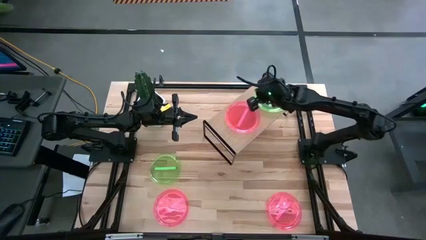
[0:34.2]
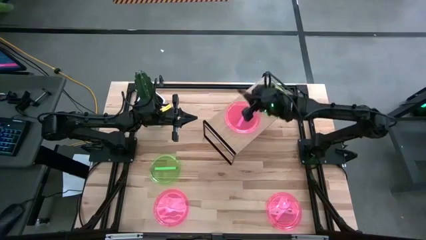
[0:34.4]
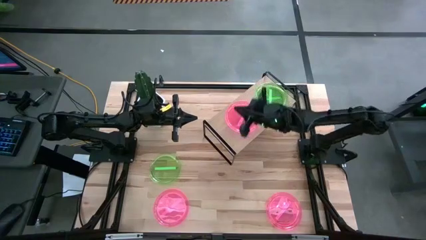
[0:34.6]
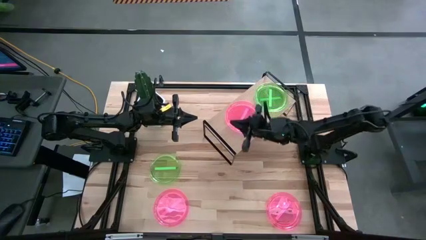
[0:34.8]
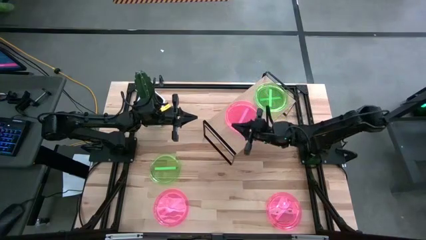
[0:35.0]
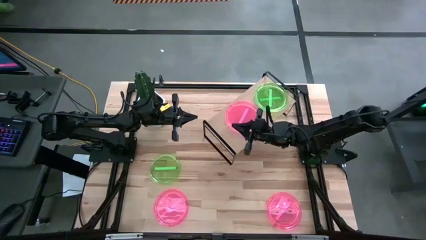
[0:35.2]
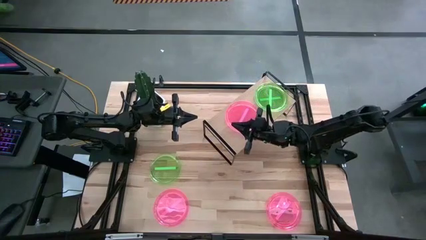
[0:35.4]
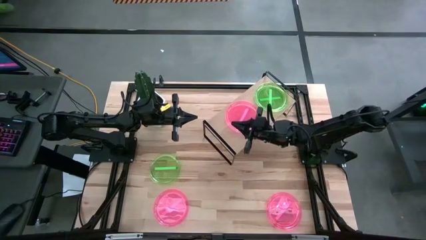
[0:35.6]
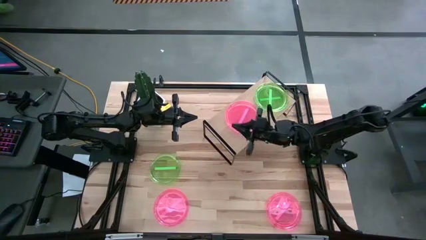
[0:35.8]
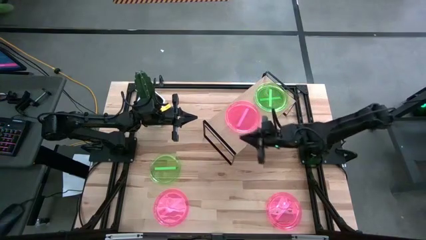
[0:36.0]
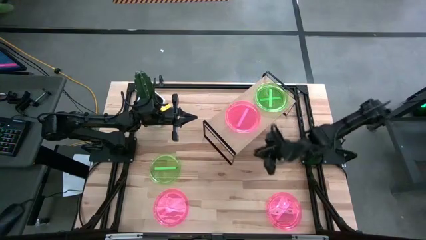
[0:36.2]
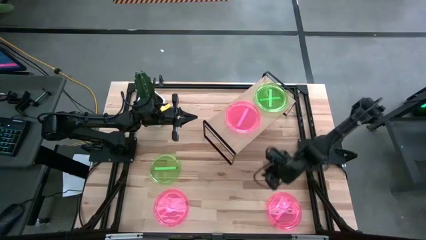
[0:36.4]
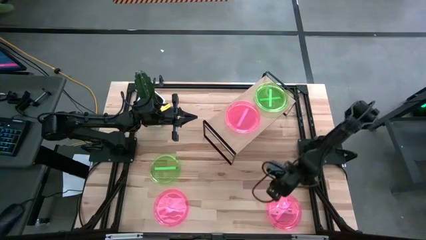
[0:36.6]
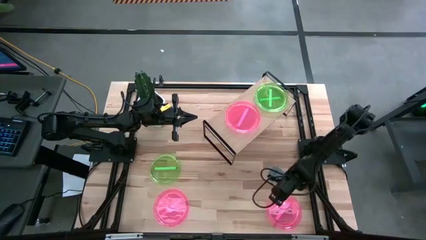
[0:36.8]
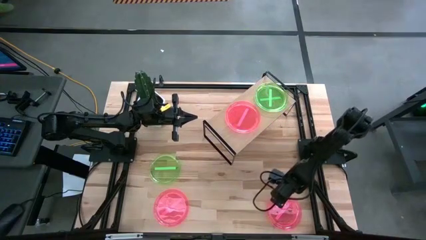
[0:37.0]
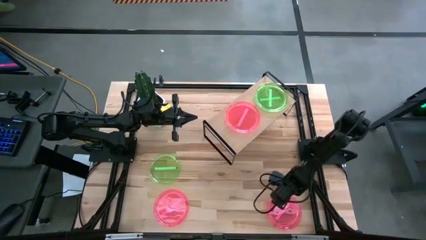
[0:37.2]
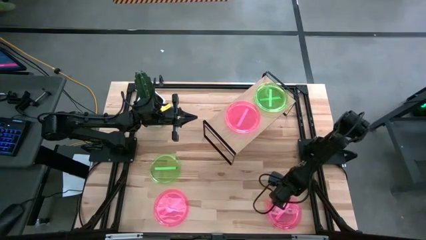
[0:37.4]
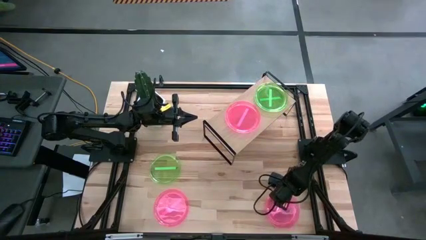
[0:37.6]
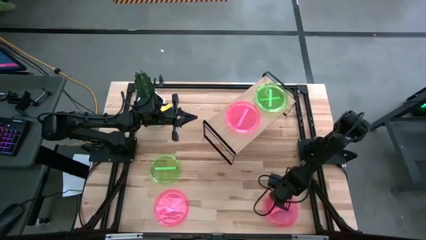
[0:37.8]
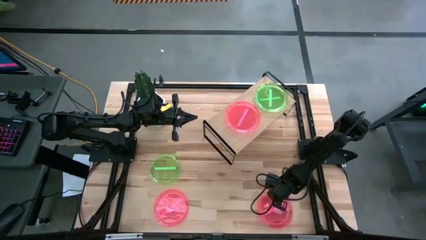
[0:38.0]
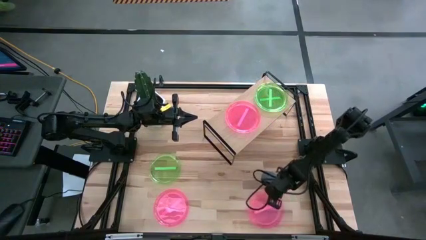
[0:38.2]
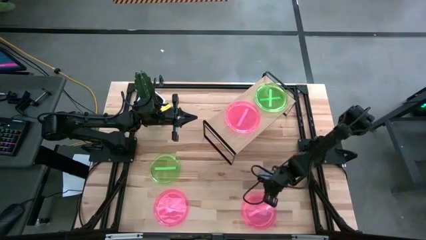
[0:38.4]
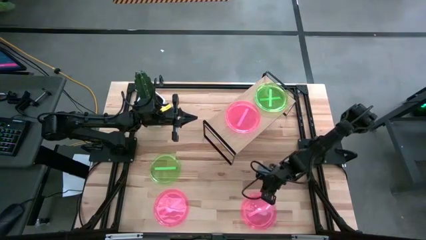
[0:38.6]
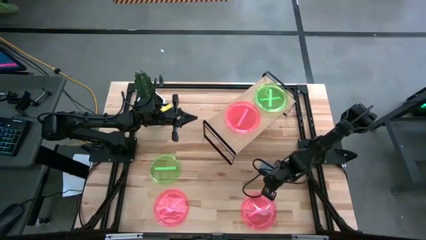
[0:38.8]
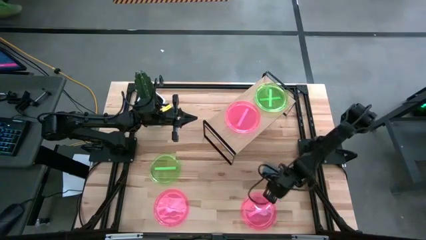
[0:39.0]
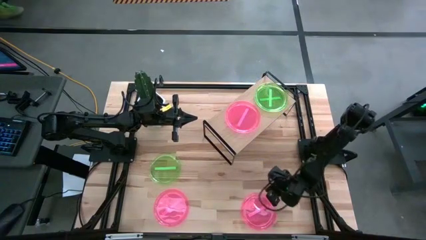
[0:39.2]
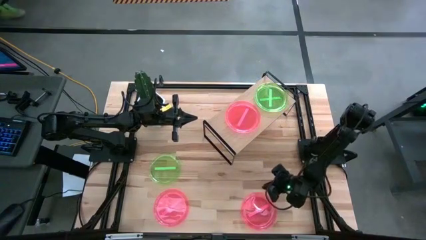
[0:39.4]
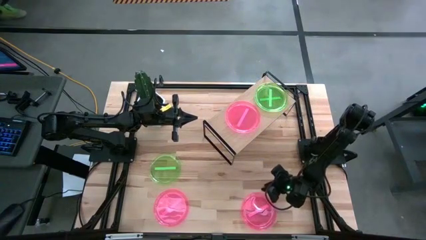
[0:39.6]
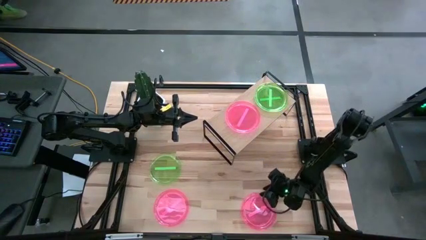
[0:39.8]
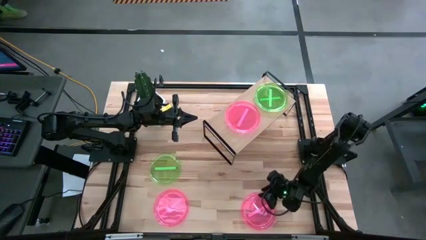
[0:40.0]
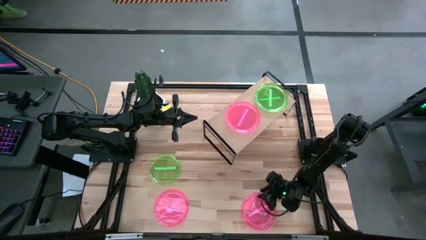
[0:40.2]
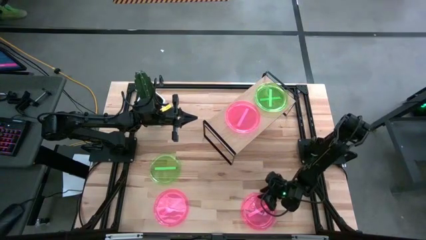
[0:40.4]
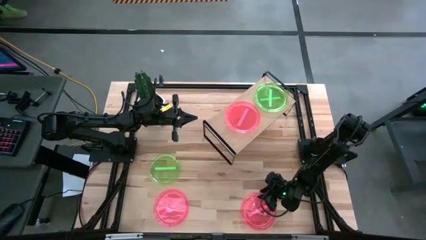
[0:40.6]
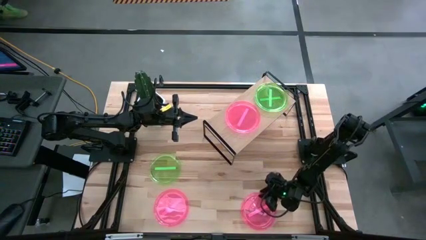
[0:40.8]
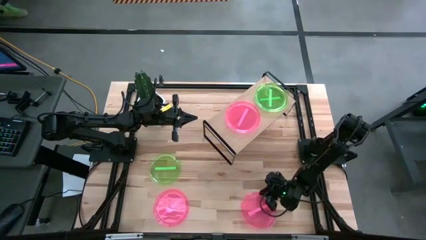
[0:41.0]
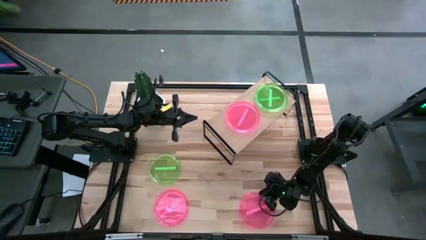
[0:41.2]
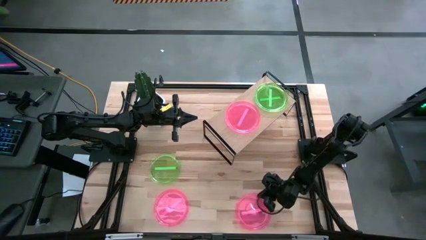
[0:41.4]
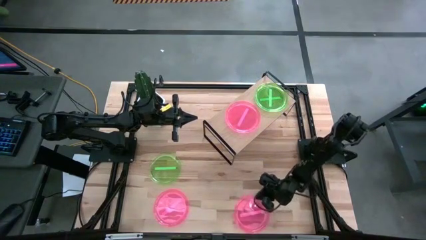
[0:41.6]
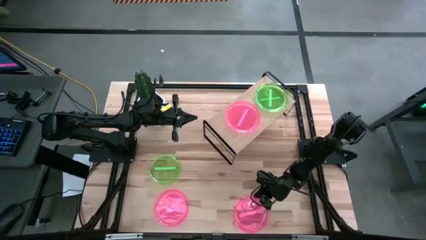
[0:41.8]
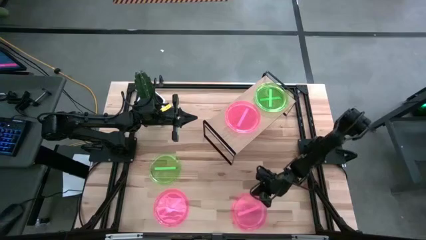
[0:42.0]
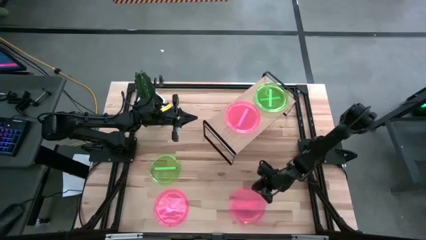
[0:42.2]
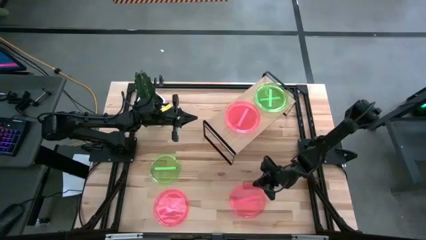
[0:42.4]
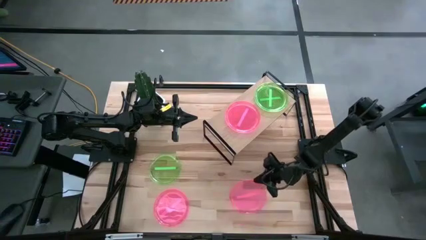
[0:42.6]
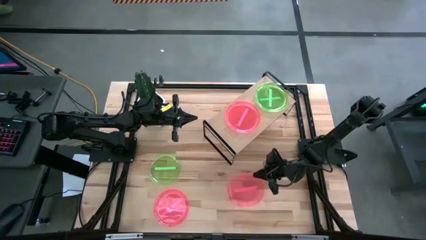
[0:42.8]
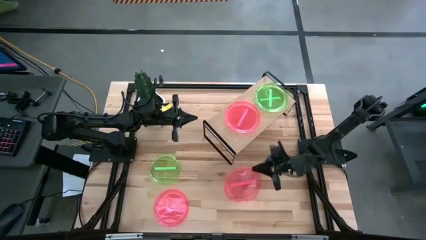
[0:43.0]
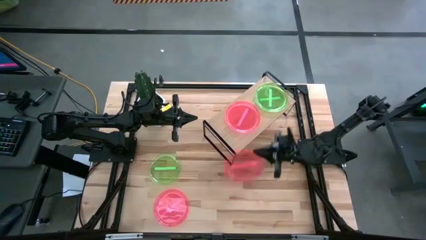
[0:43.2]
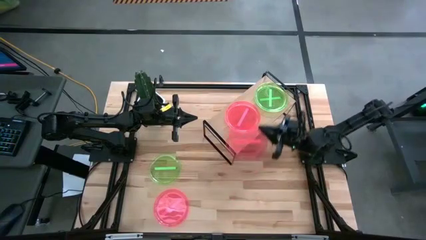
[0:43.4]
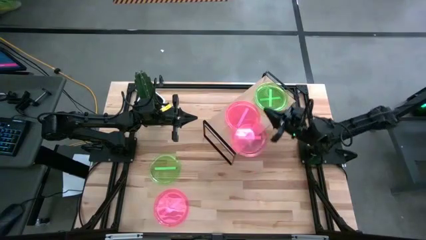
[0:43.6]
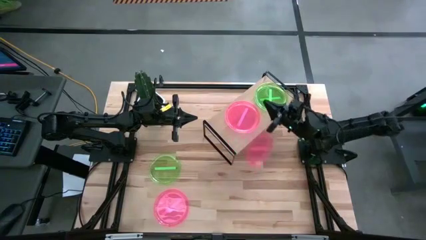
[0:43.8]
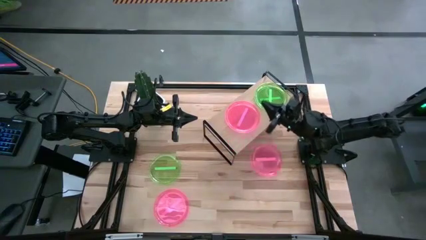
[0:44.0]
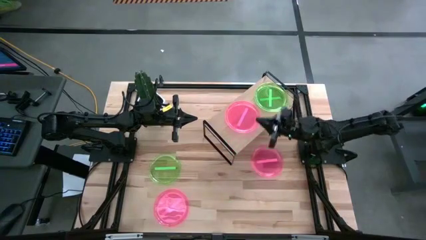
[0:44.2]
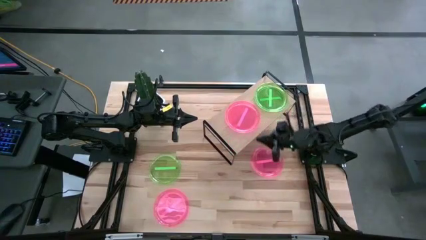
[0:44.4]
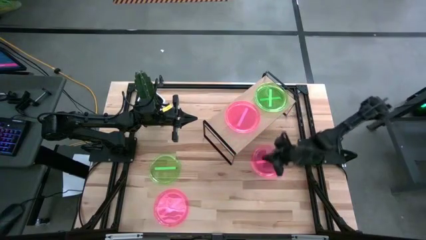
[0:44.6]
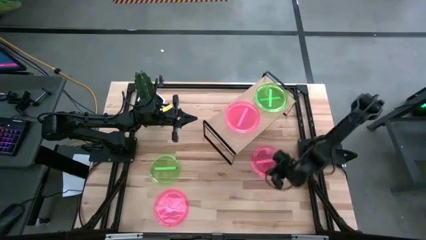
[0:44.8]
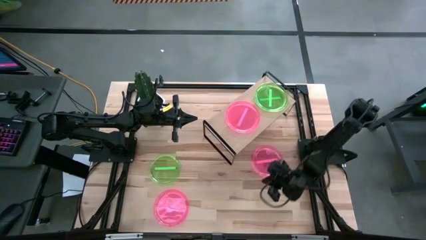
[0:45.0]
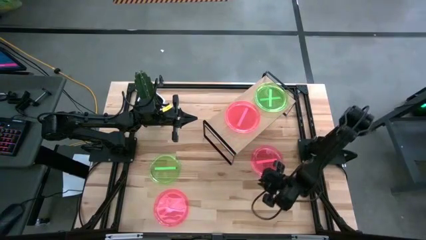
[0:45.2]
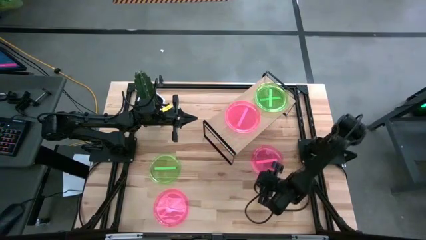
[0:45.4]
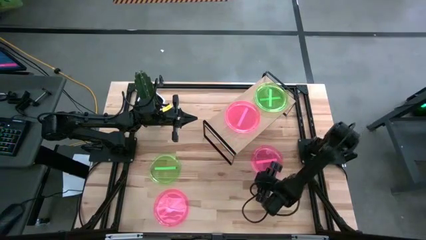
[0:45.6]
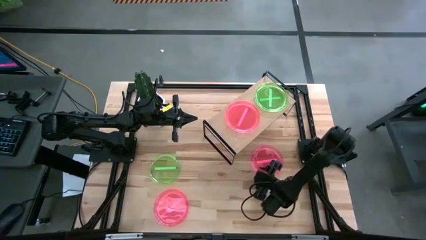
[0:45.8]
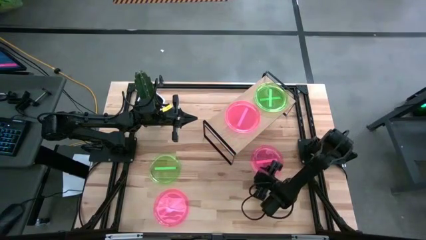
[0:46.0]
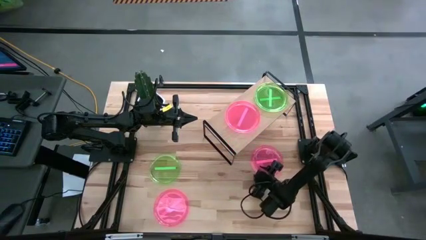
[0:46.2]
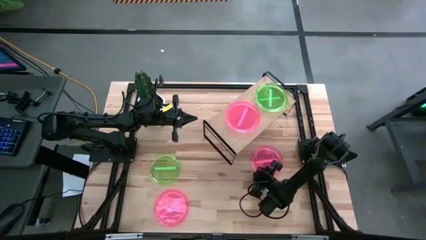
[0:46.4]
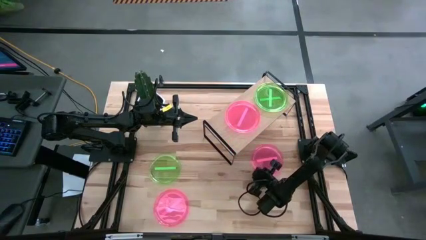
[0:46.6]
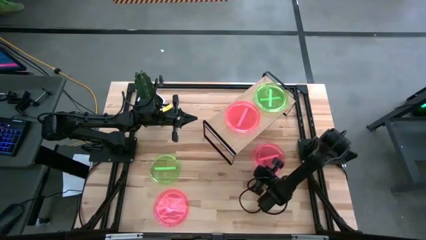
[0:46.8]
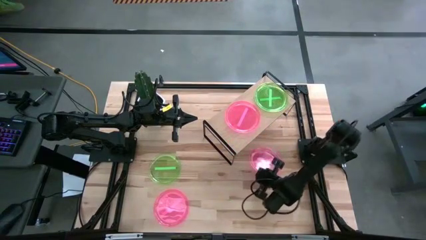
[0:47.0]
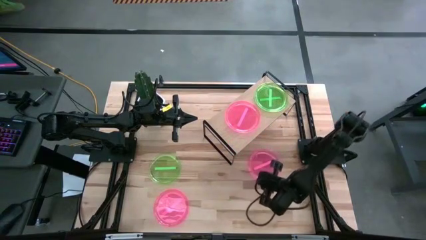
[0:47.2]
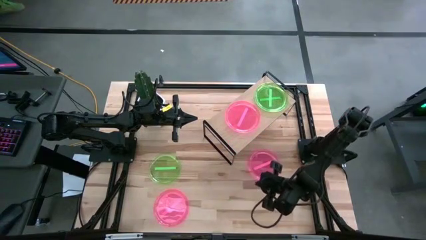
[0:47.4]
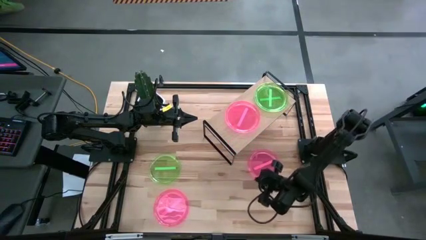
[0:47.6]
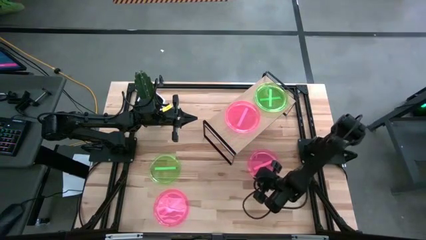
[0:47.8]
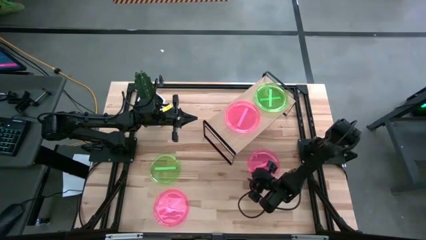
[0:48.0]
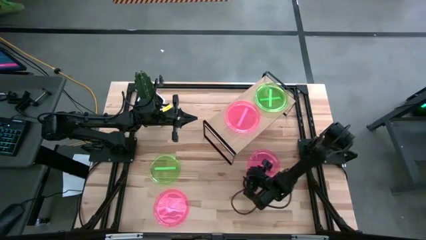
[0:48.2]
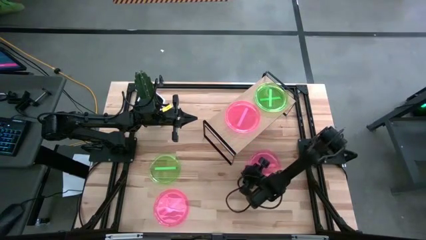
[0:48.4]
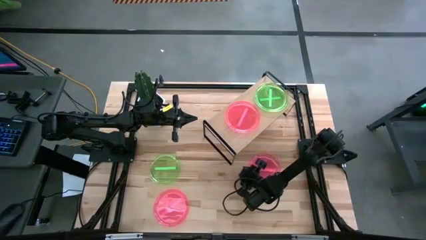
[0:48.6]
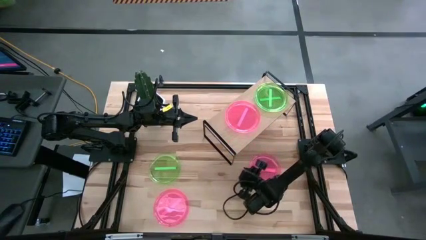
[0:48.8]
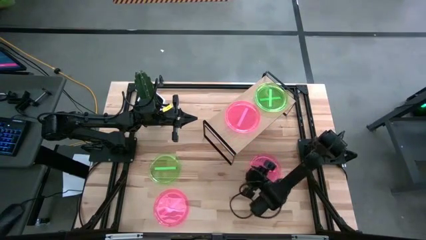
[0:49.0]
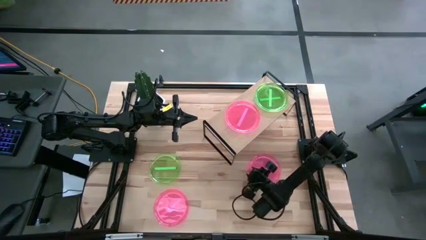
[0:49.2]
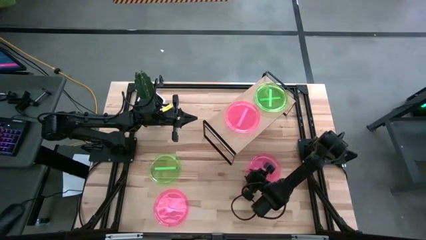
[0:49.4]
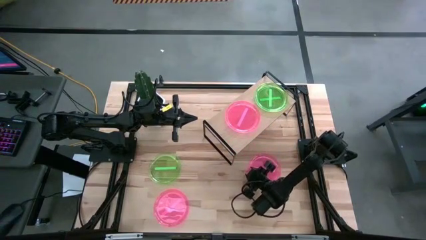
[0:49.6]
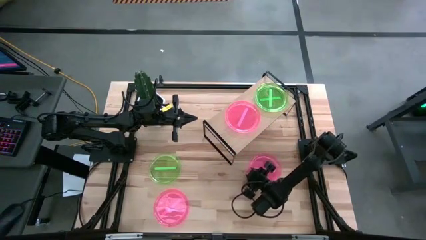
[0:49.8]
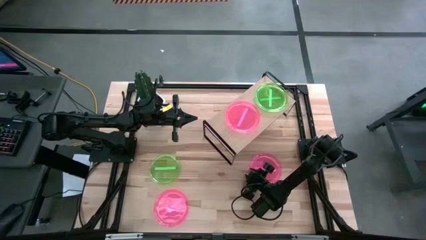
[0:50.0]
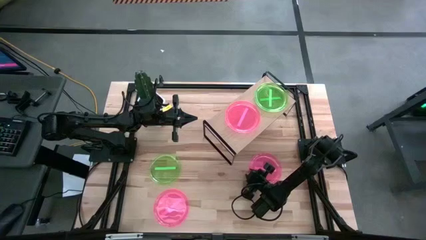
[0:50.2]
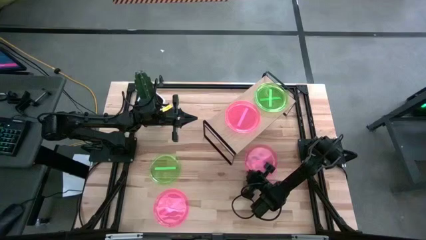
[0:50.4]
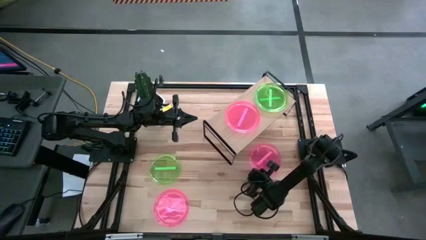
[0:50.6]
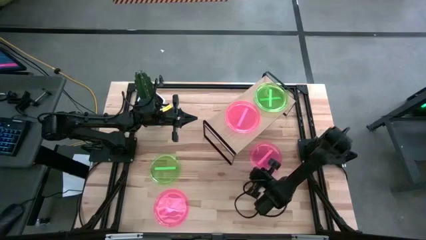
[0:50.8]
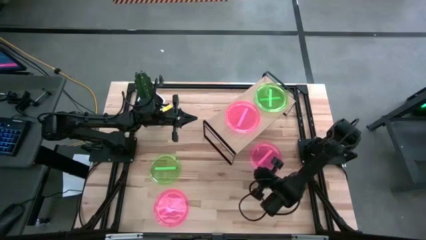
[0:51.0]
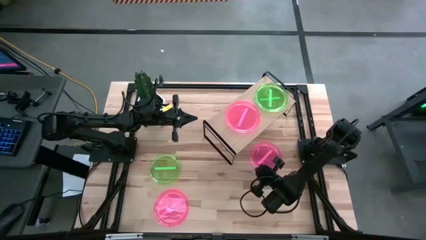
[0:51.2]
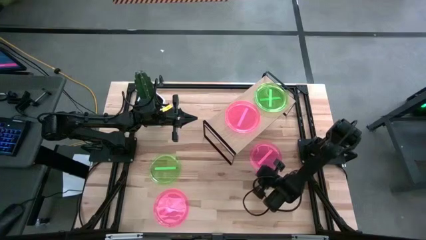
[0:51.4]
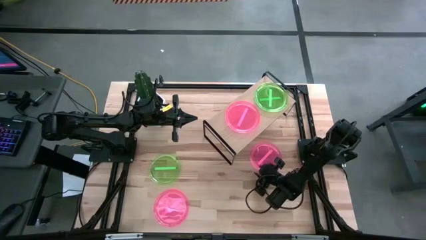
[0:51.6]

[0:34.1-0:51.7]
Task: Place and stack plates onto a shelf
Stack the right pink plate on top of the pink plate on the shelf
